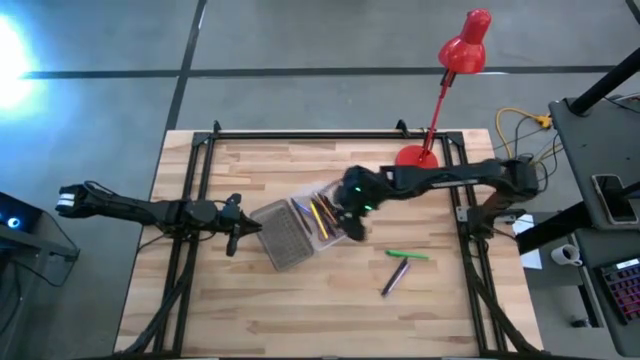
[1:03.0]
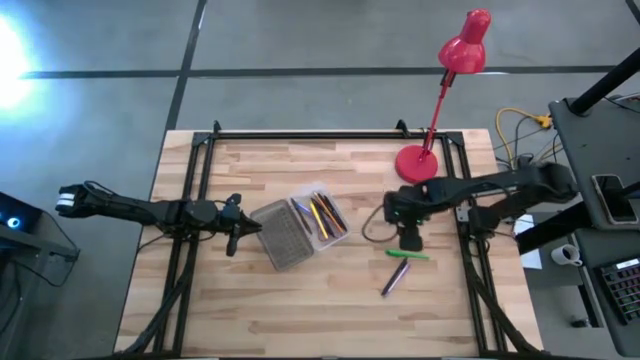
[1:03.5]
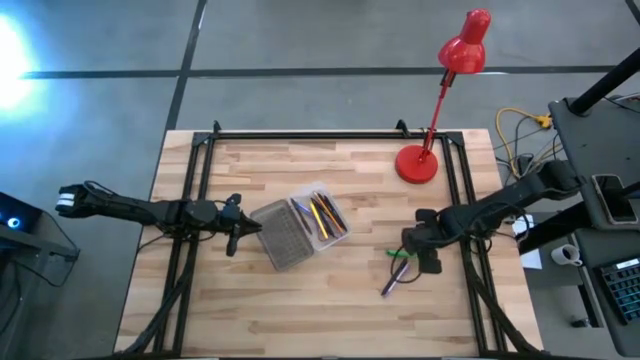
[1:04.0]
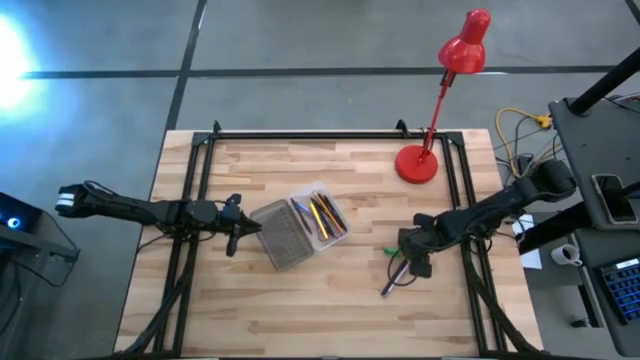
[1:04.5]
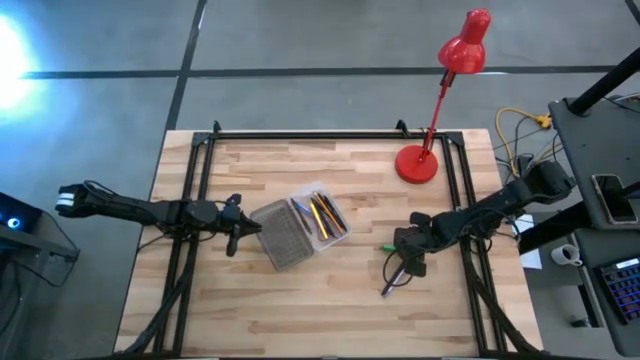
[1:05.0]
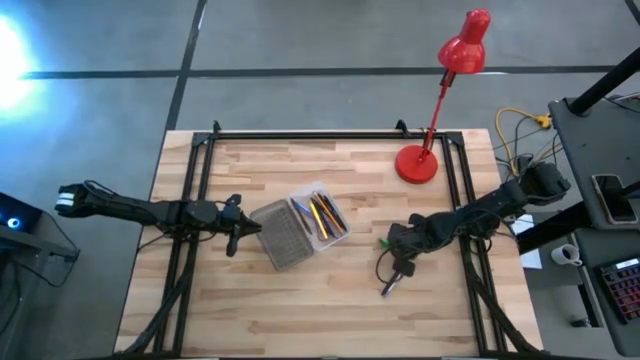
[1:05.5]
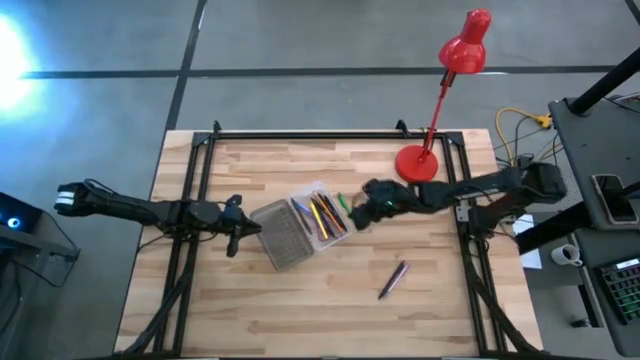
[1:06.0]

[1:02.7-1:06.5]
Task: Pick & place school supplies into a supply box
Put the green pen into the gray supply box

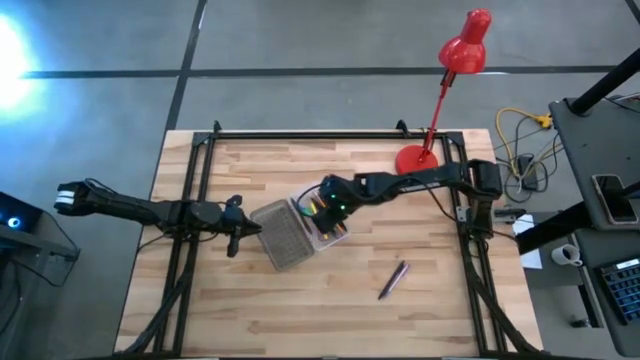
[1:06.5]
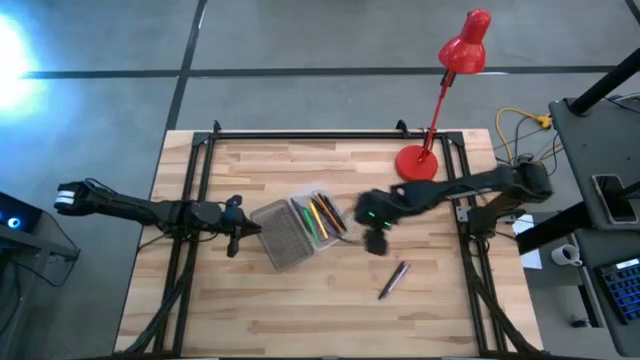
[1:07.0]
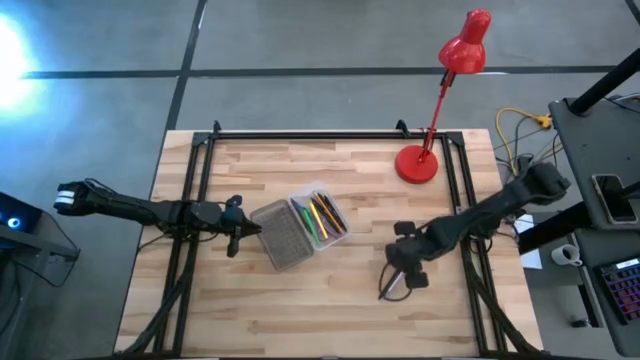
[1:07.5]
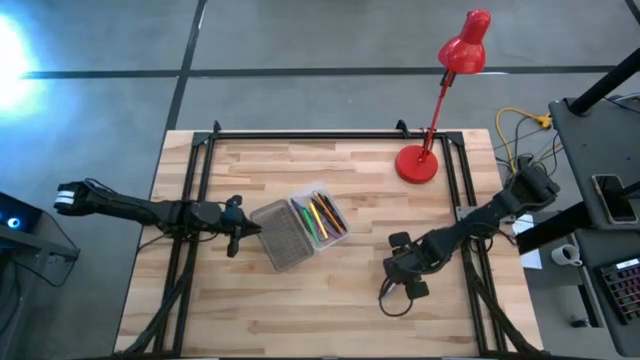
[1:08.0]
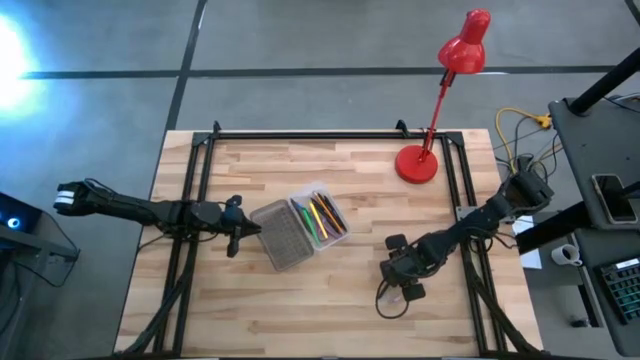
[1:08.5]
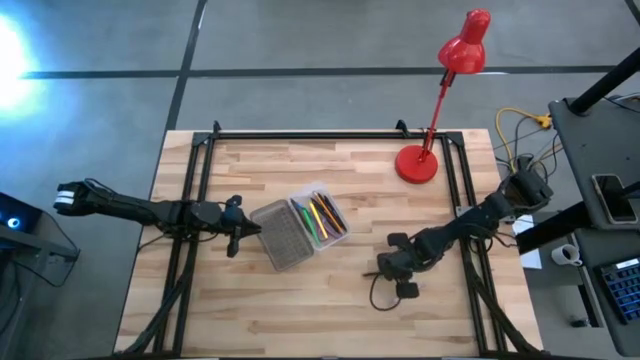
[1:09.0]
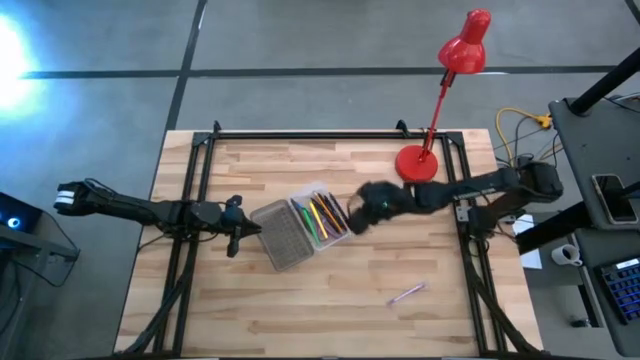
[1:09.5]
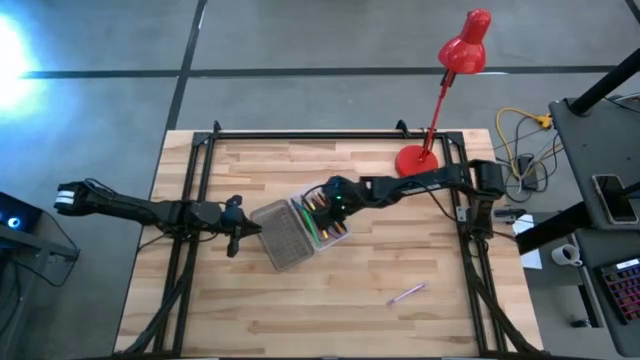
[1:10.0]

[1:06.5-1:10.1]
Put the black pen into the gray supply box

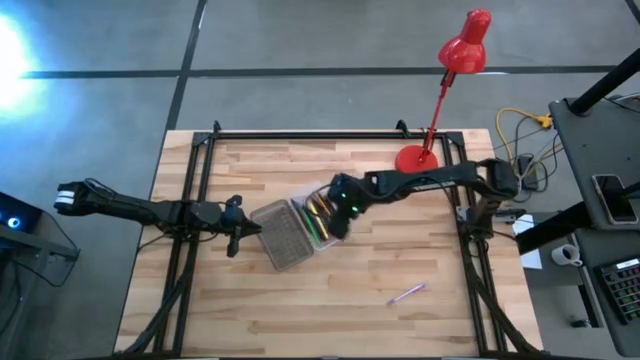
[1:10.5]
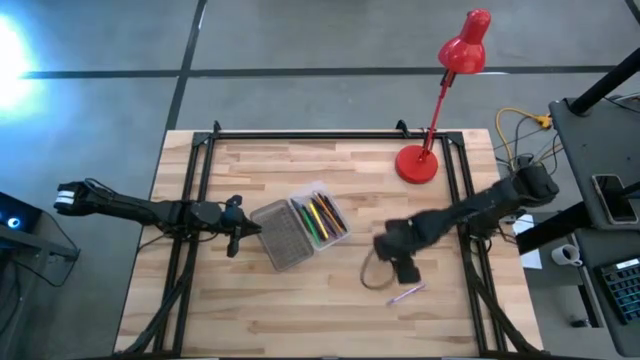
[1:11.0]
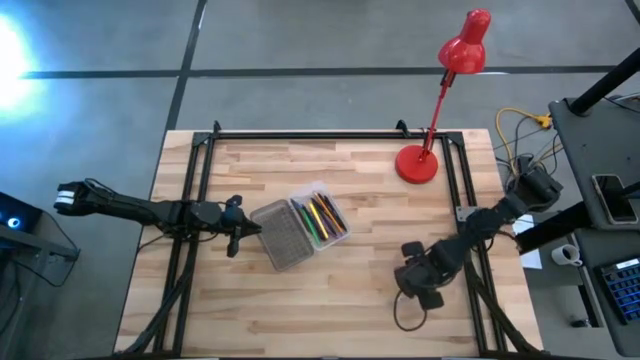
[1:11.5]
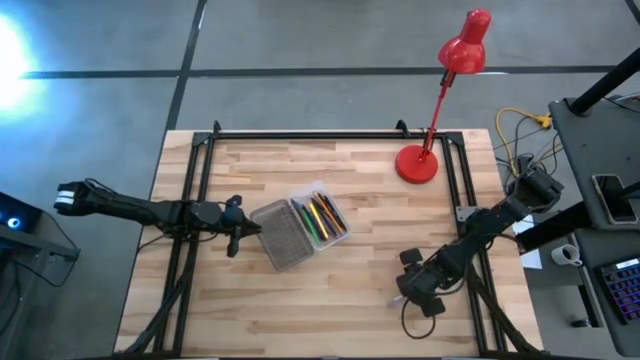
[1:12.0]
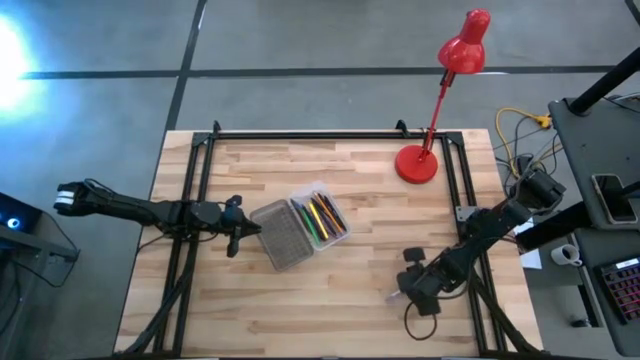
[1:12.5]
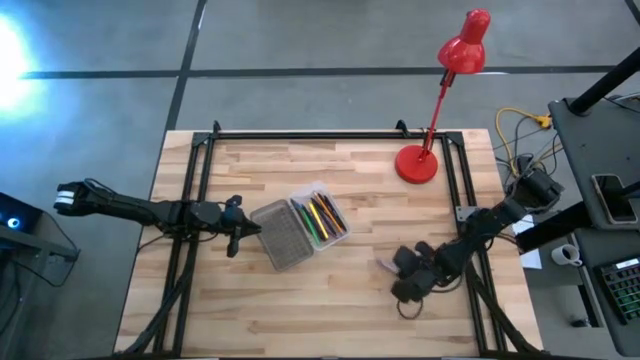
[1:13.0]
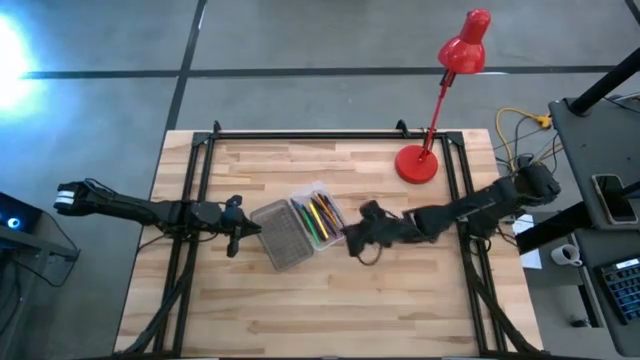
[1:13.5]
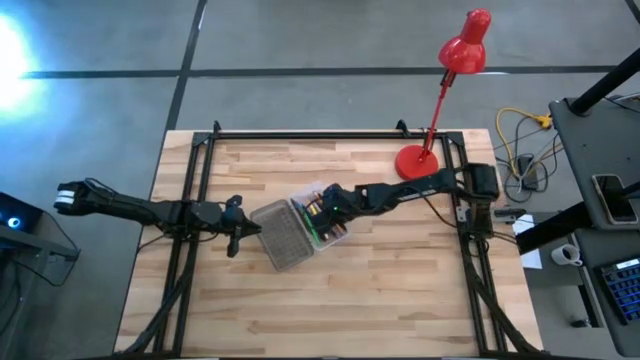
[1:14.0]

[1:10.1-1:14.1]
Put the purple pen into the gray supply box

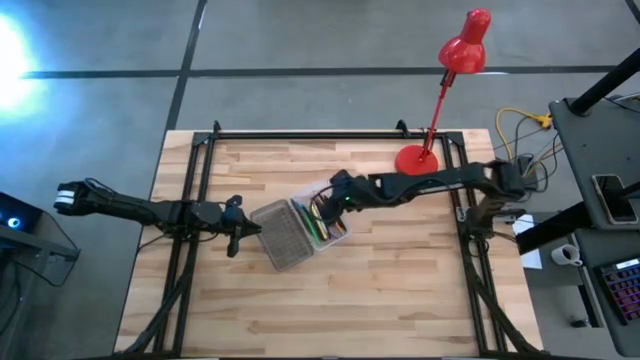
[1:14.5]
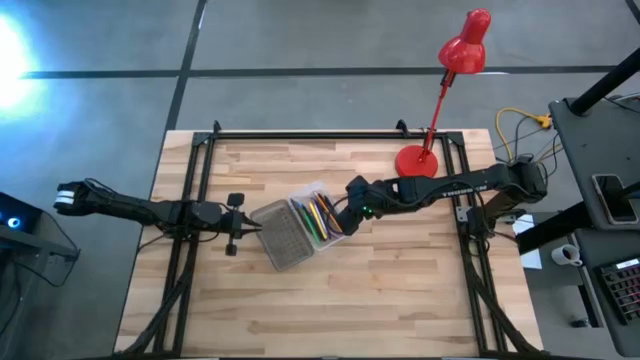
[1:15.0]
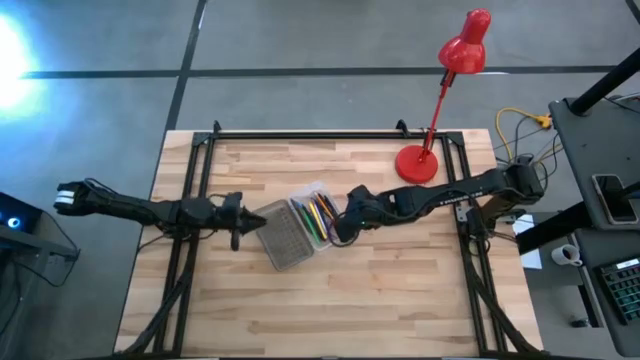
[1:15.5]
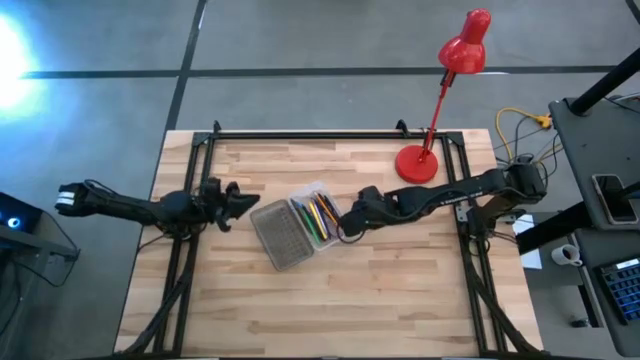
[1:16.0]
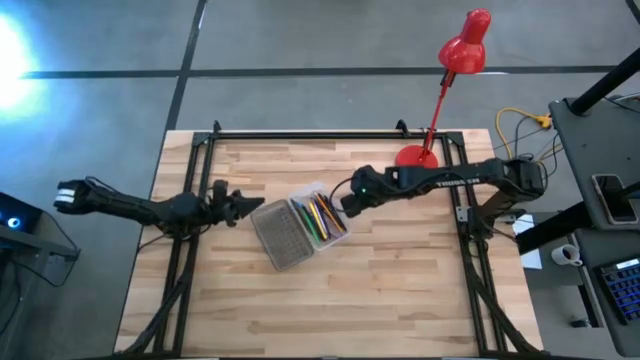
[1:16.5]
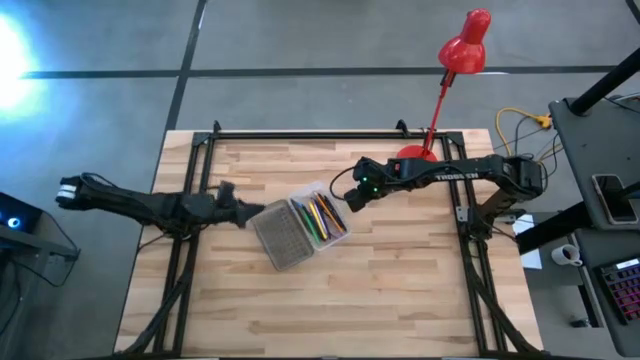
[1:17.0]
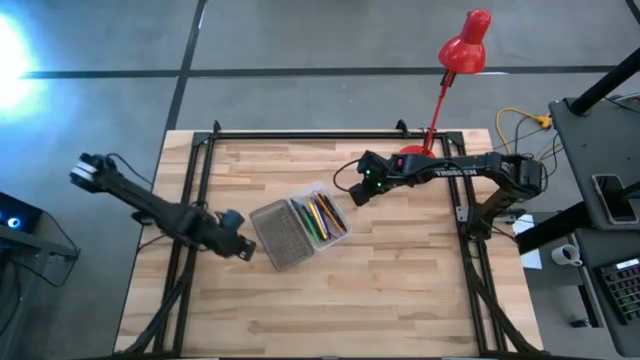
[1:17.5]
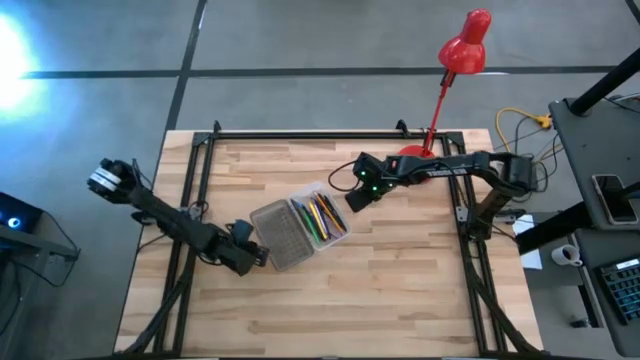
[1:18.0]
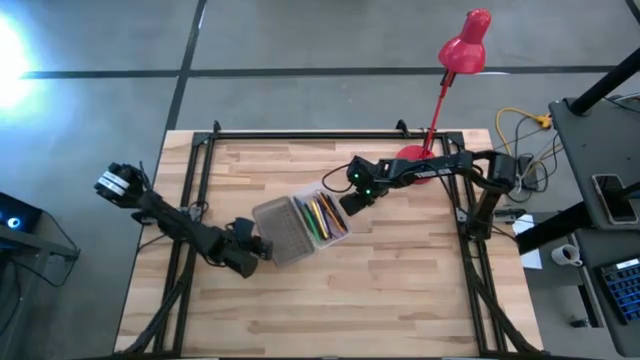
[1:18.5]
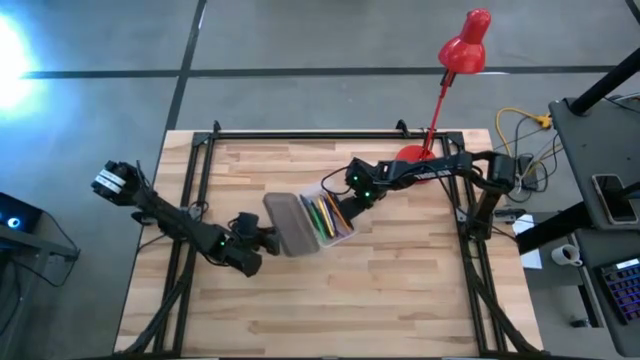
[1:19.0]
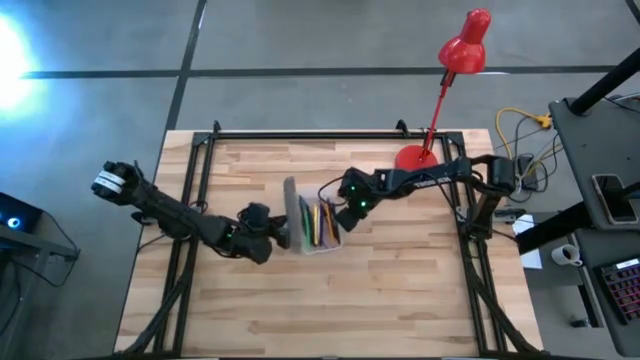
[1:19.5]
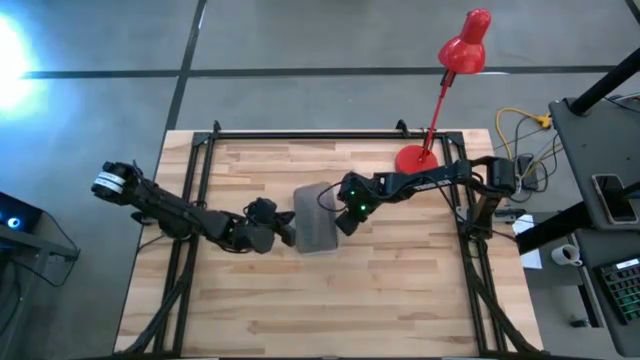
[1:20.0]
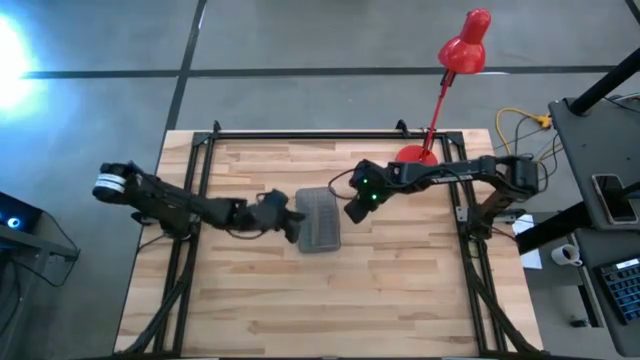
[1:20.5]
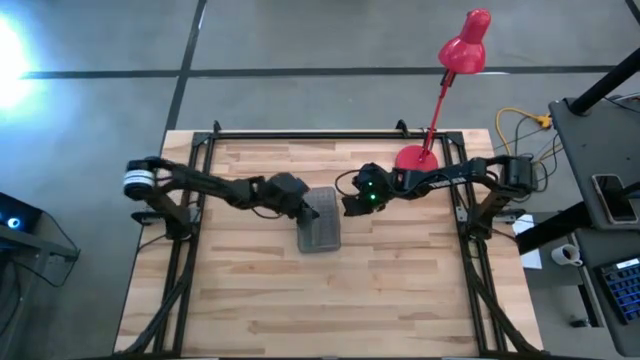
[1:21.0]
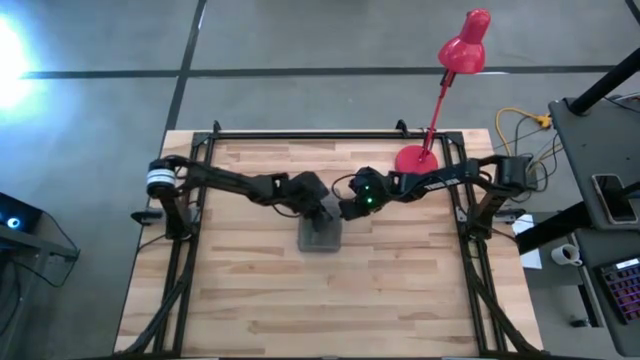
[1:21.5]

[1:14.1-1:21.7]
Close the gray supply box

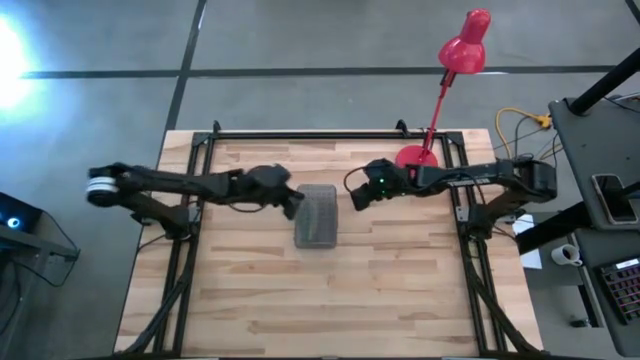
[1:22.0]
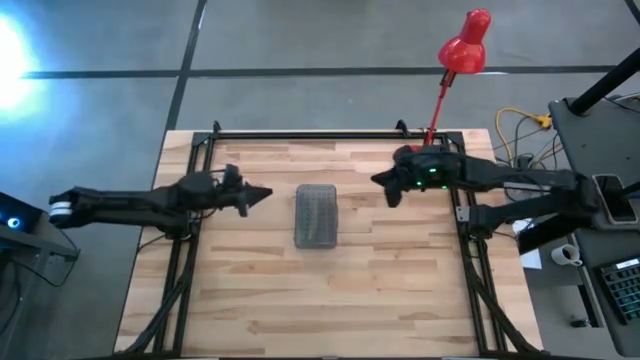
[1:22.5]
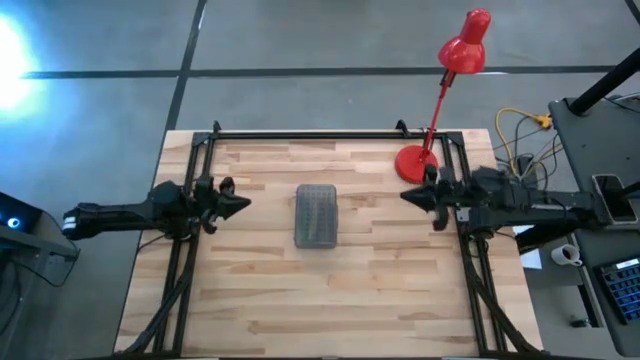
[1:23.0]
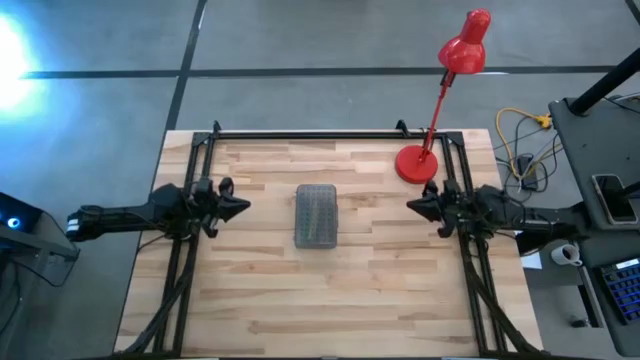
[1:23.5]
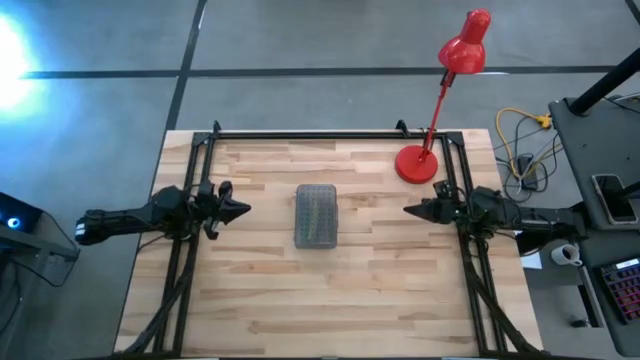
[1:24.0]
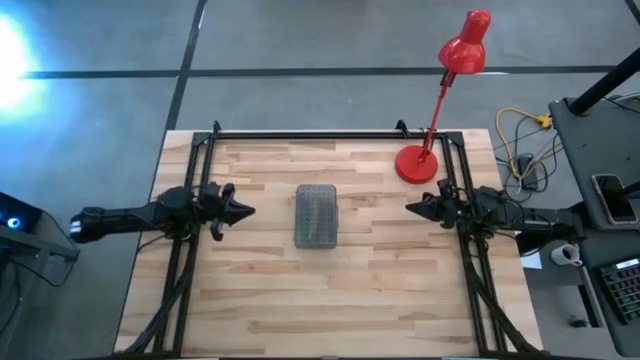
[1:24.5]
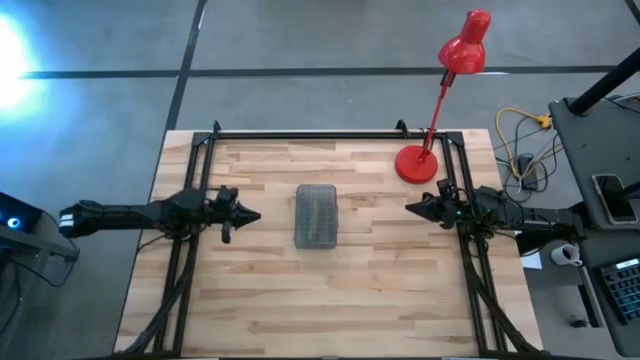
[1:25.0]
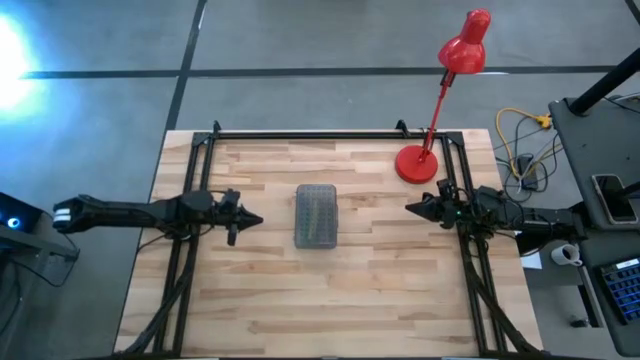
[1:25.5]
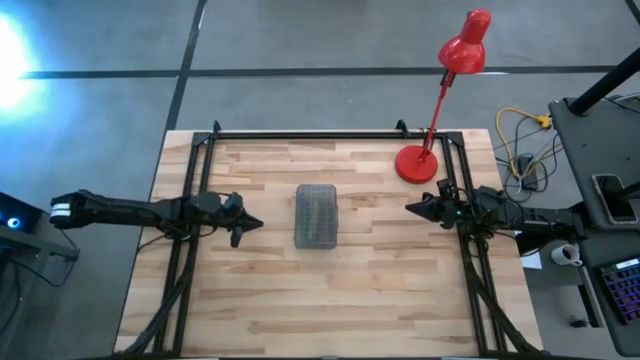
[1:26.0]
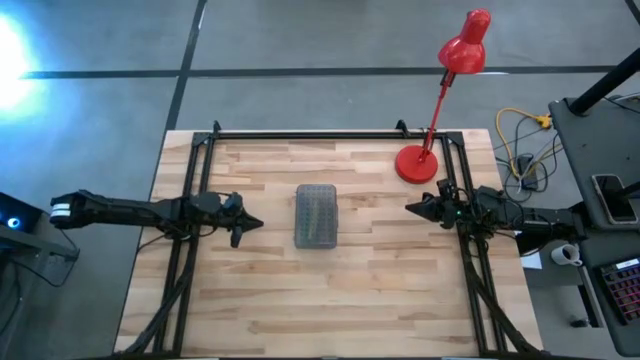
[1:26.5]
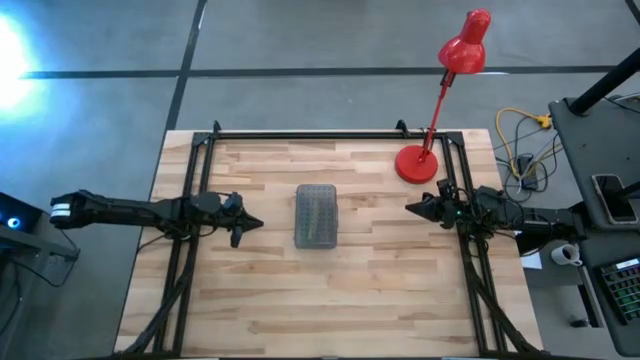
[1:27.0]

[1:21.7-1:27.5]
Return to Home Position
